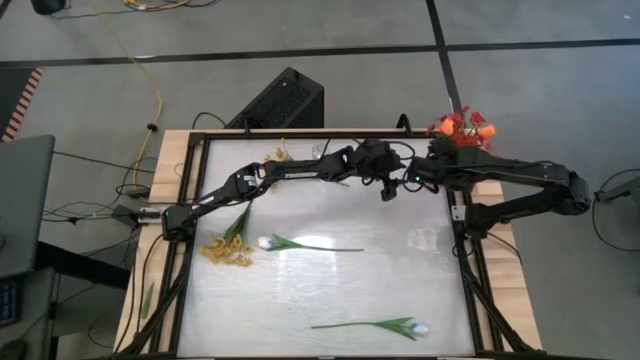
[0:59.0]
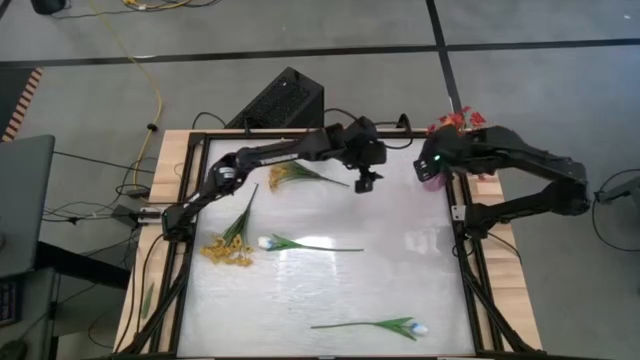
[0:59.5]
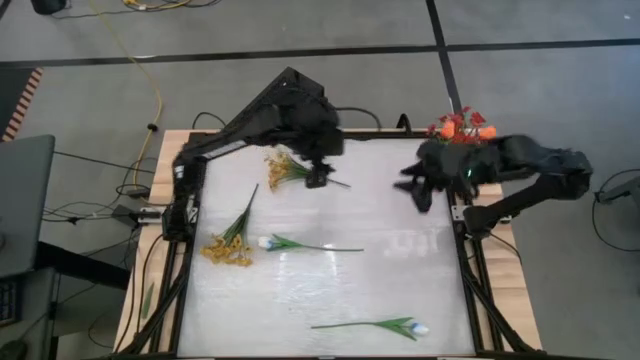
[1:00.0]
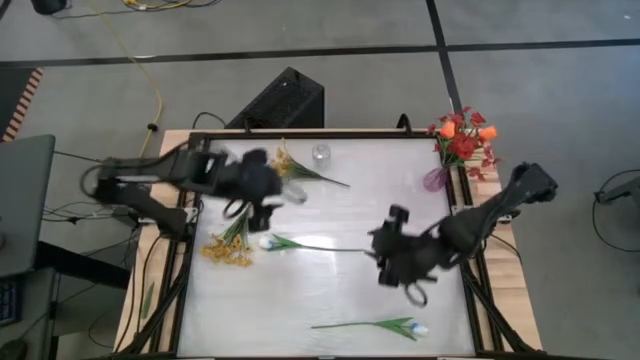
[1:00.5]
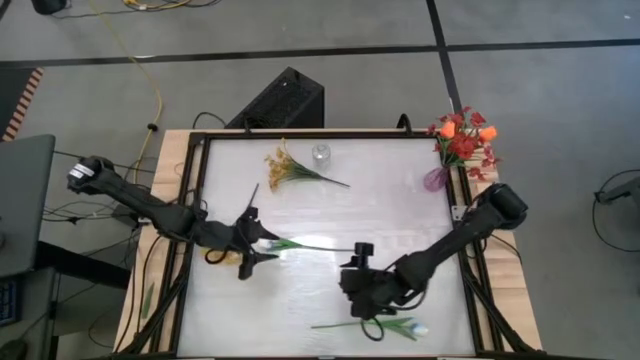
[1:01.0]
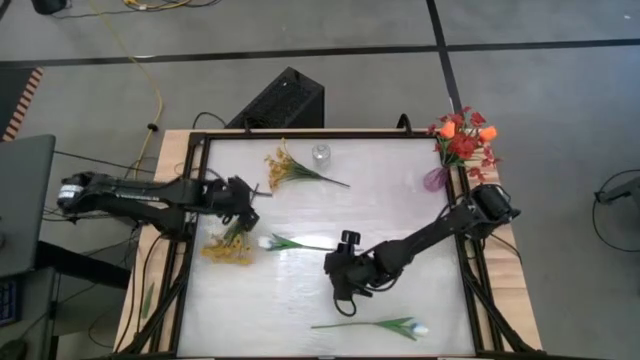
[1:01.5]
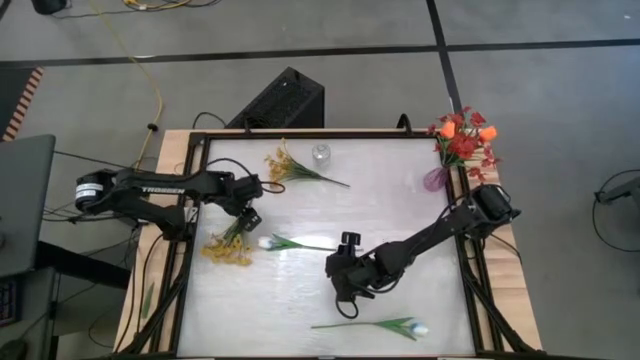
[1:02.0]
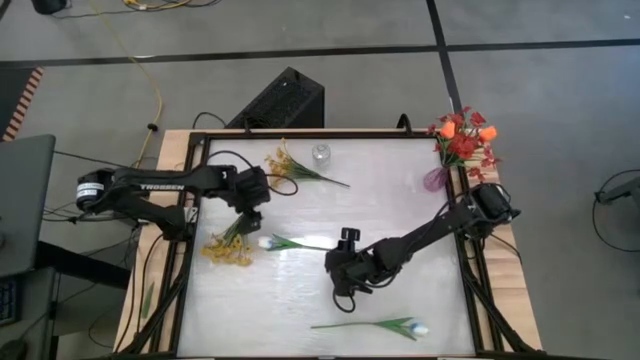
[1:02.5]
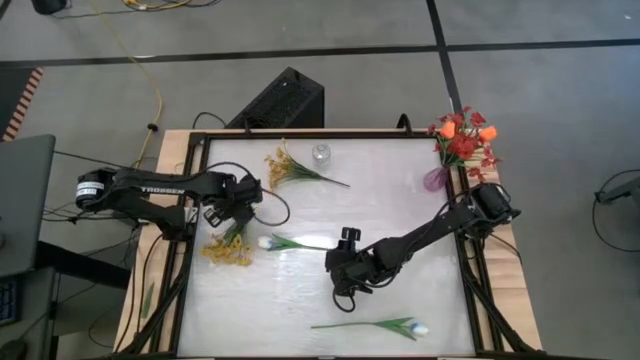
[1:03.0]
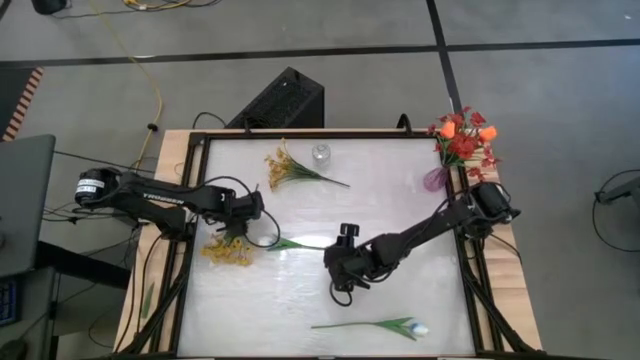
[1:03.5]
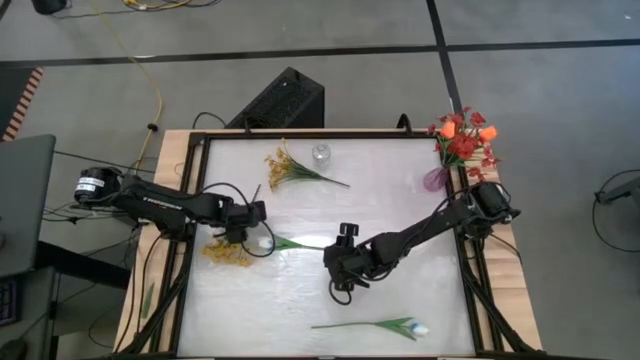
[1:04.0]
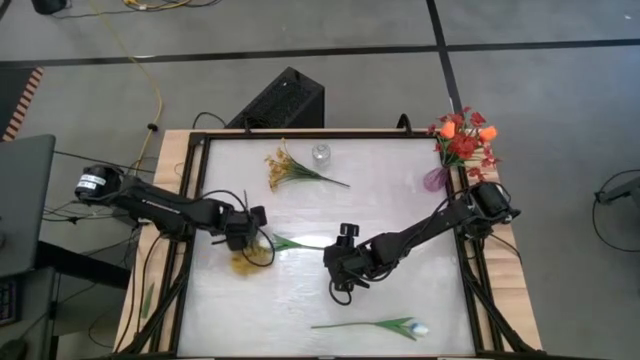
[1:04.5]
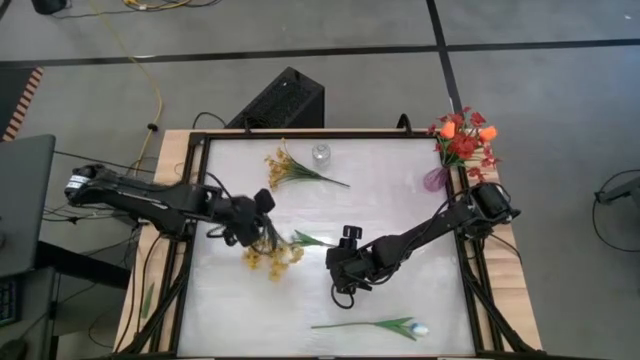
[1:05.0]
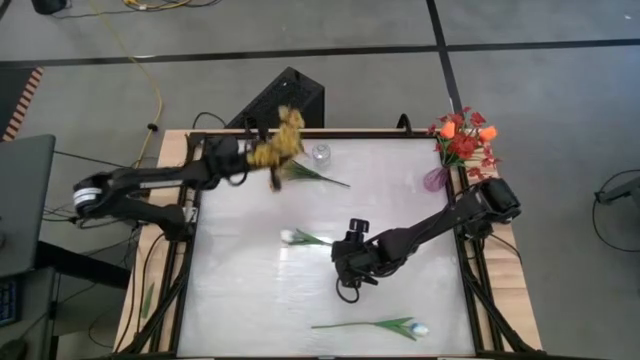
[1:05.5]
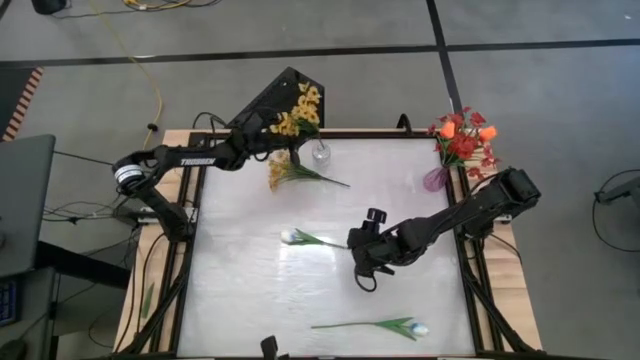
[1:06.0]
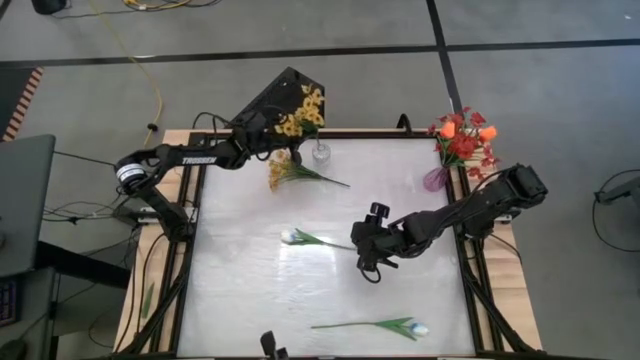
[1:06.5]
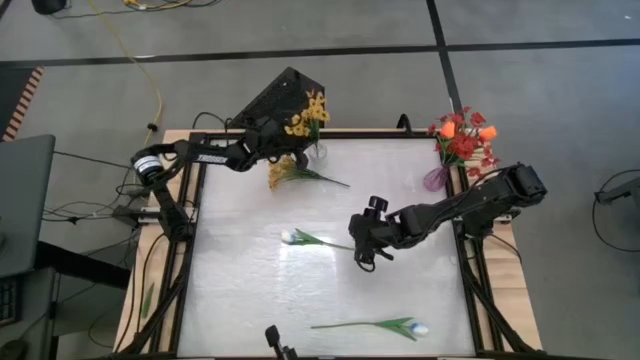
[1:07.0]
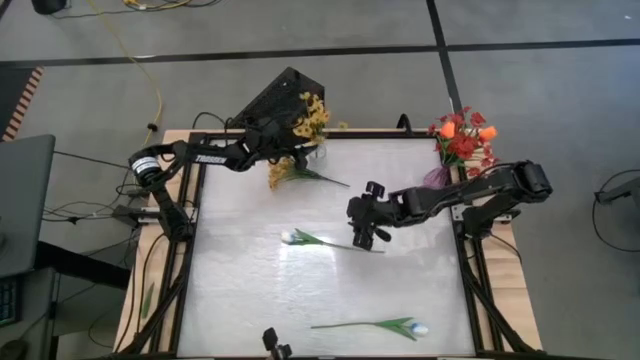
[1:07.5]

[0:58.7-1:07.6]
Task: Sort flowers into vase by color
Put the bottom yellow flowers into the transparent vase

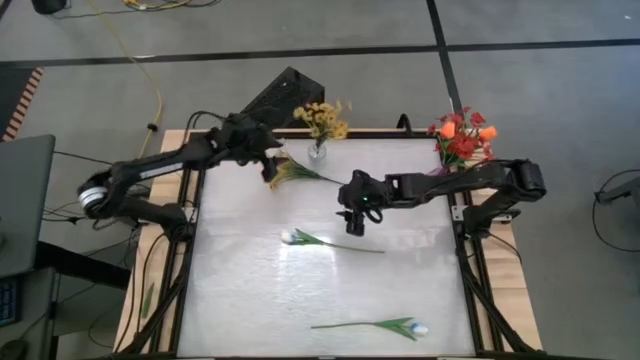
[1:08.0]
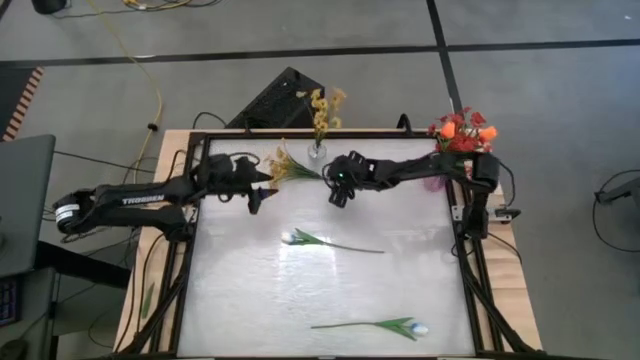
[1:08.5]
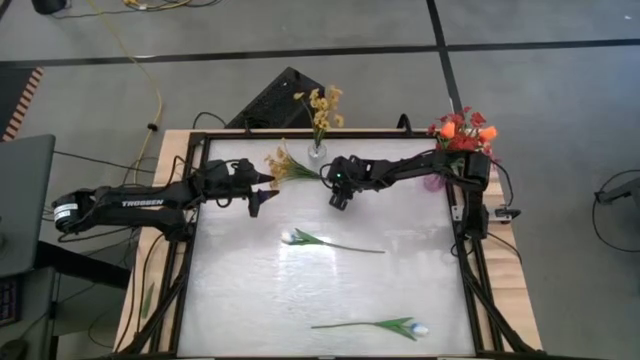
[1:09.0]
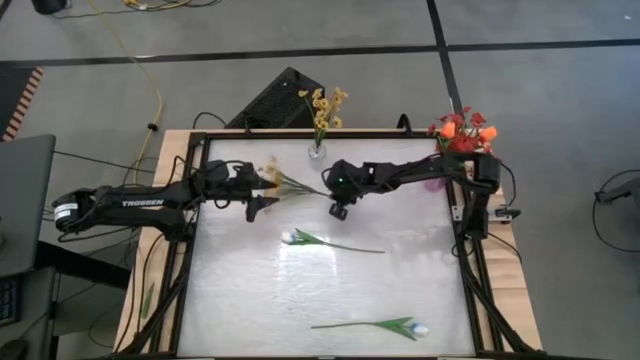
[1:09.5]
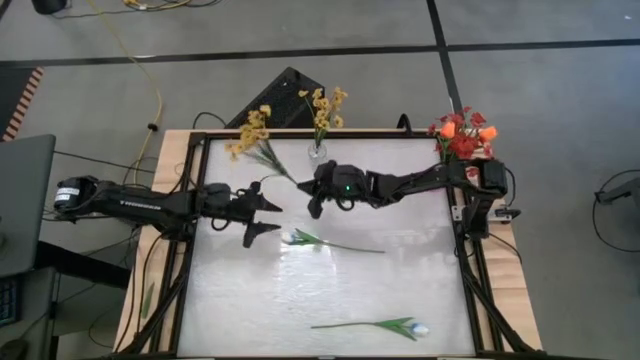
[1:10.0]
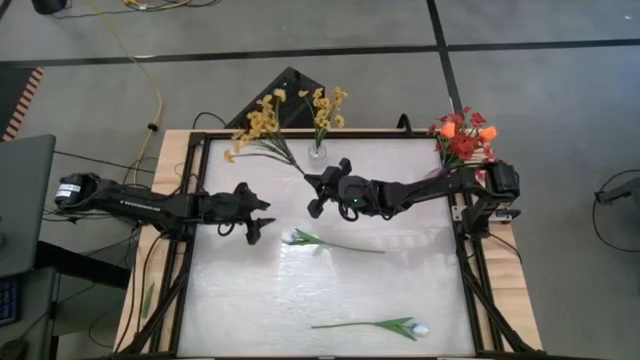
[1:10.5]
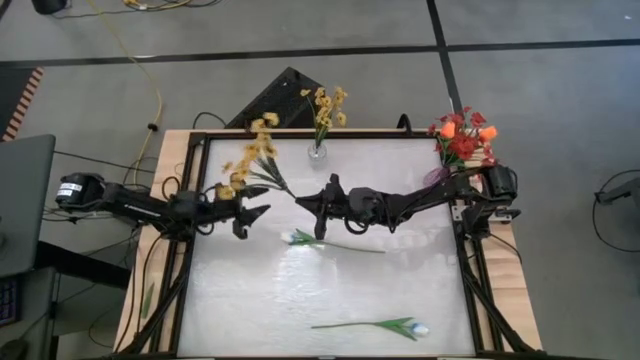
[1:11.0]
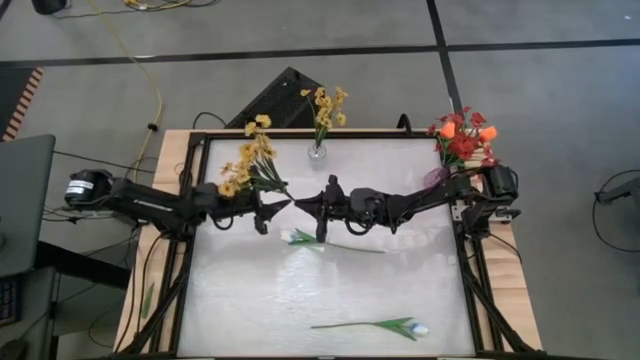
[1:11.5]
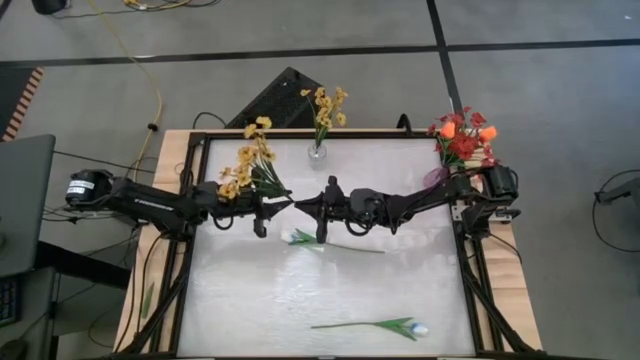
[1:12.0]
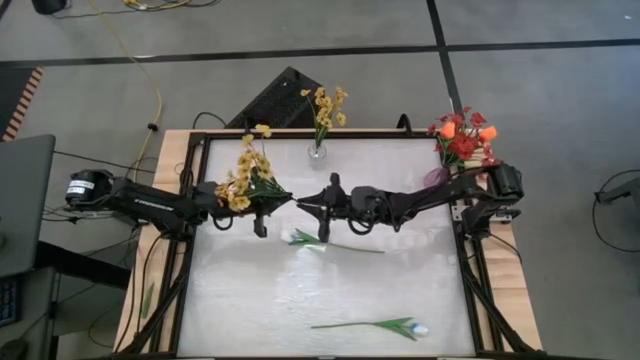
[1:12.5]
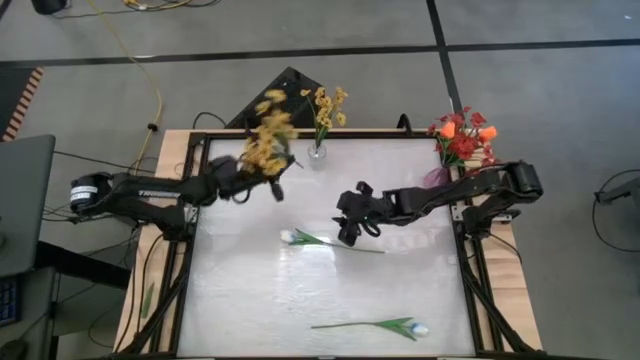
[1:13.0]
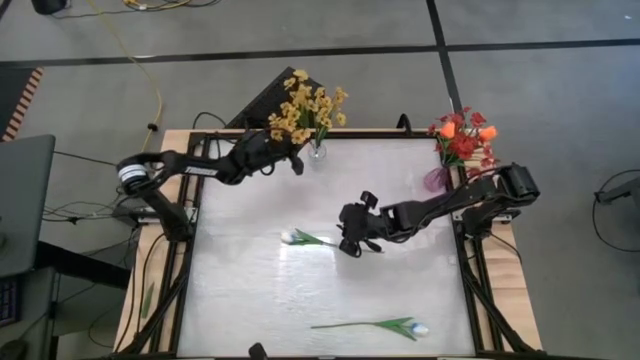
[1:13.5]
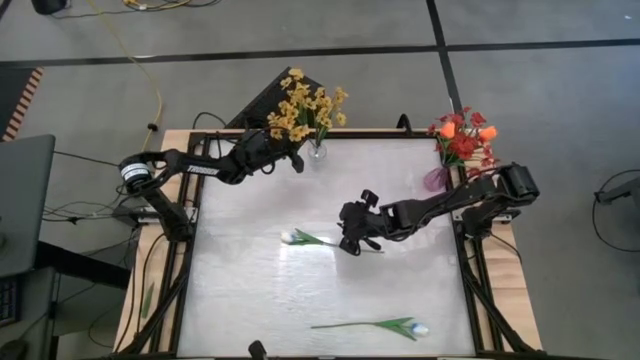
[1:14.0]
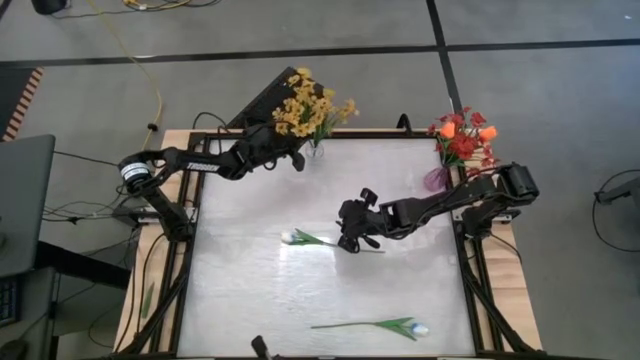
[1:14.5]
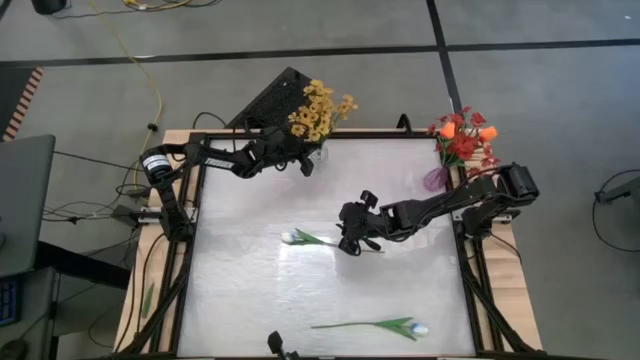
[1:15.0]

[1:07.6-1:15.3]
Put the yellow flowers into the transparent vase
